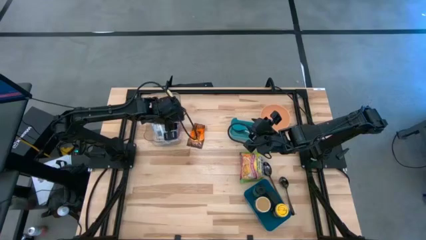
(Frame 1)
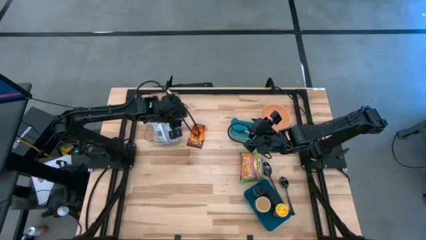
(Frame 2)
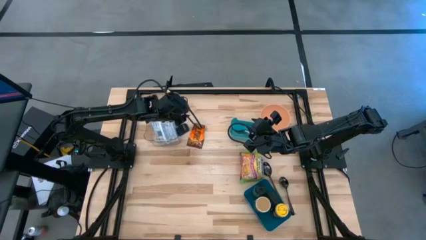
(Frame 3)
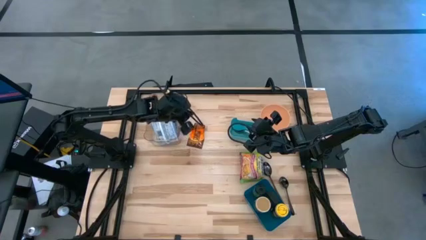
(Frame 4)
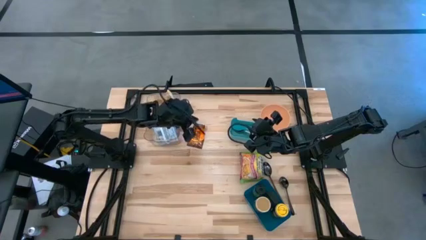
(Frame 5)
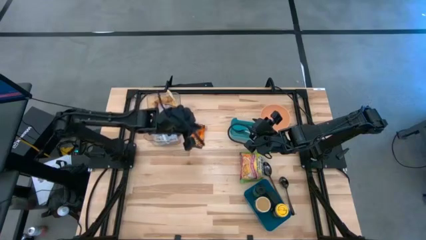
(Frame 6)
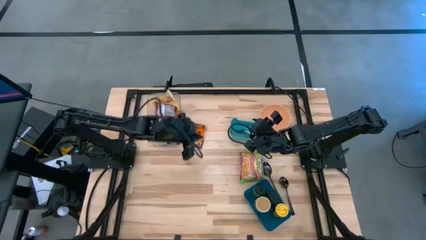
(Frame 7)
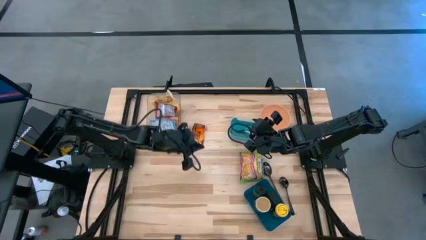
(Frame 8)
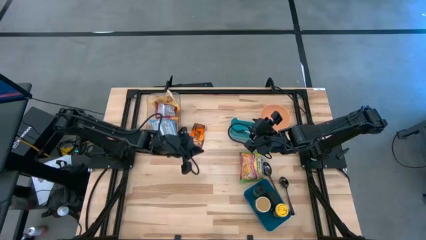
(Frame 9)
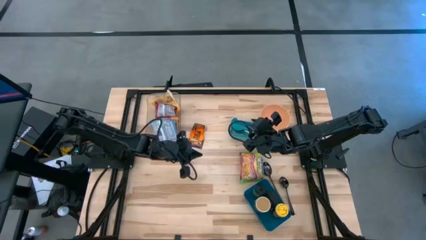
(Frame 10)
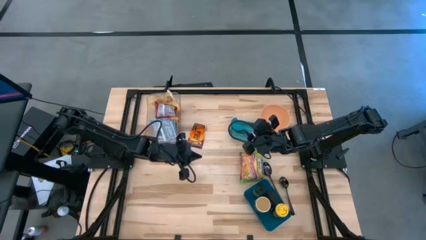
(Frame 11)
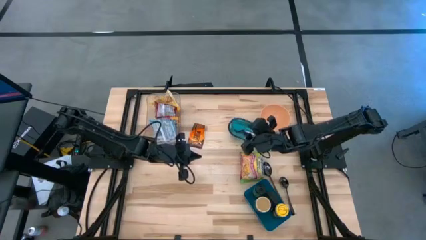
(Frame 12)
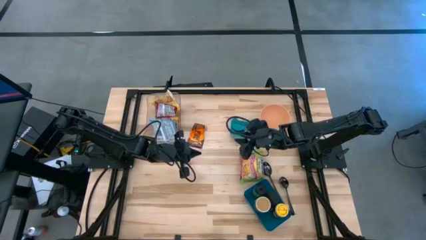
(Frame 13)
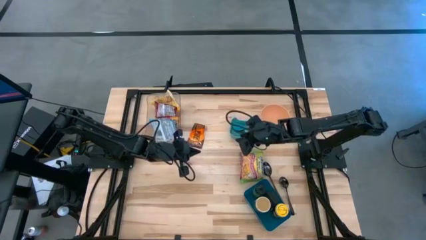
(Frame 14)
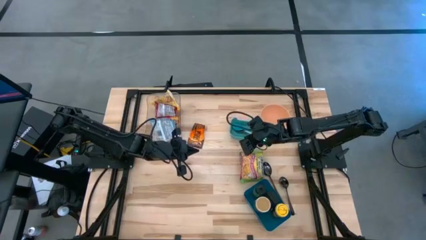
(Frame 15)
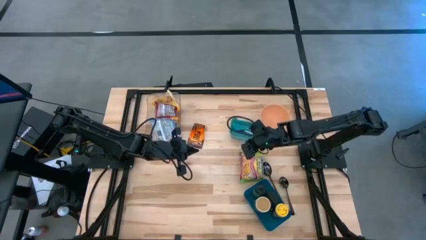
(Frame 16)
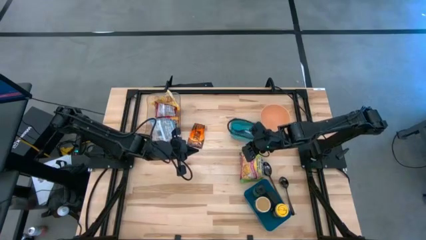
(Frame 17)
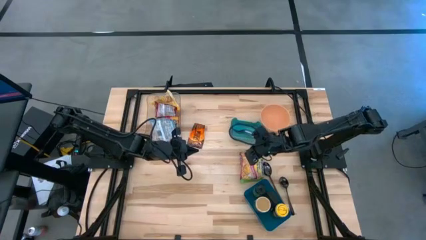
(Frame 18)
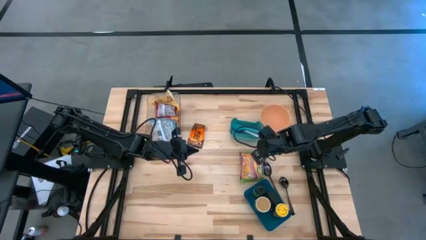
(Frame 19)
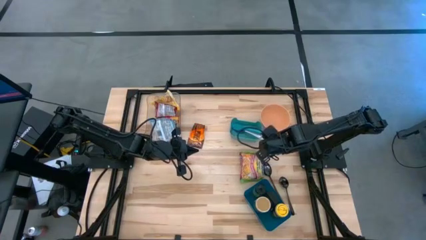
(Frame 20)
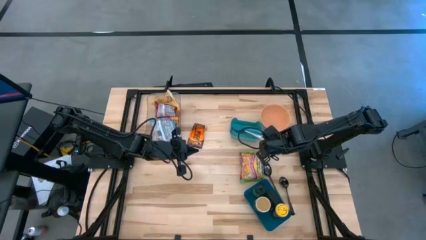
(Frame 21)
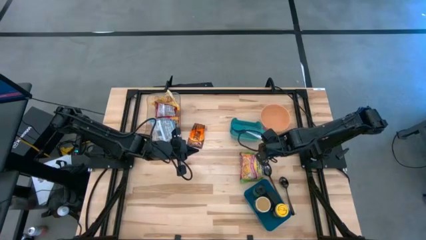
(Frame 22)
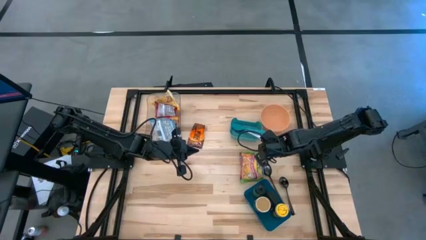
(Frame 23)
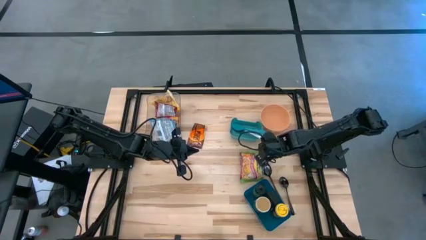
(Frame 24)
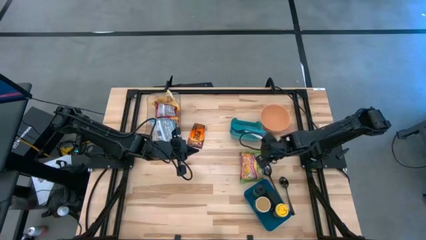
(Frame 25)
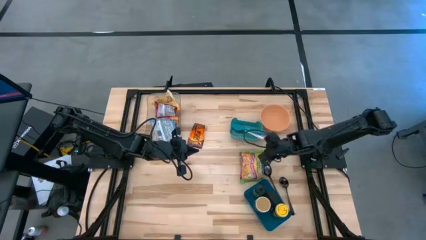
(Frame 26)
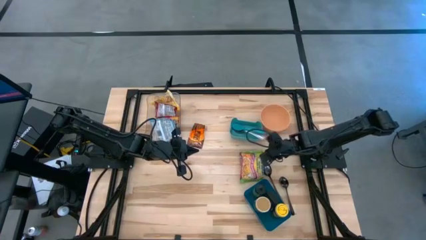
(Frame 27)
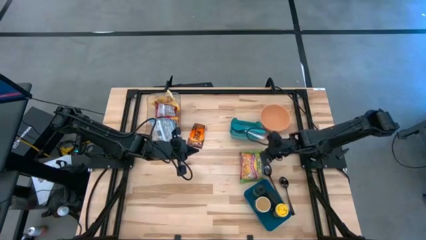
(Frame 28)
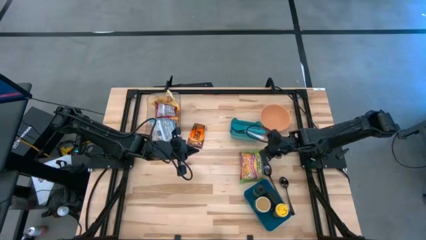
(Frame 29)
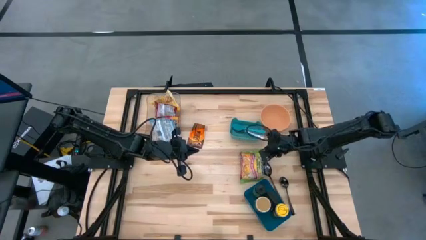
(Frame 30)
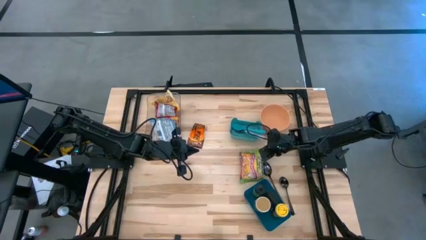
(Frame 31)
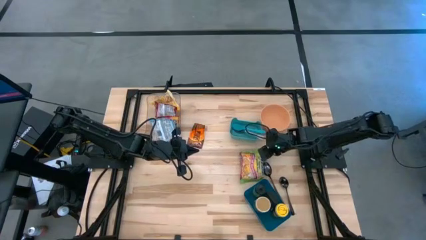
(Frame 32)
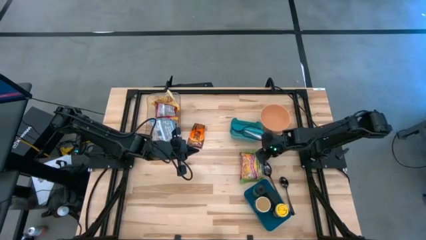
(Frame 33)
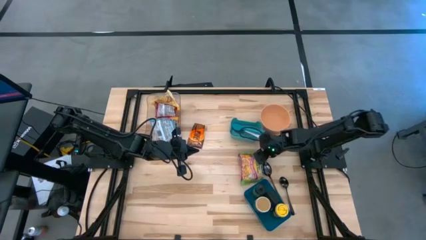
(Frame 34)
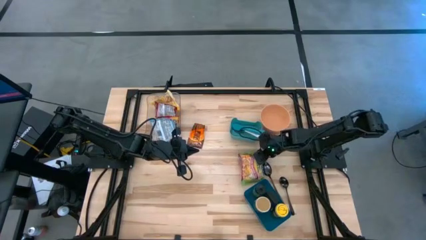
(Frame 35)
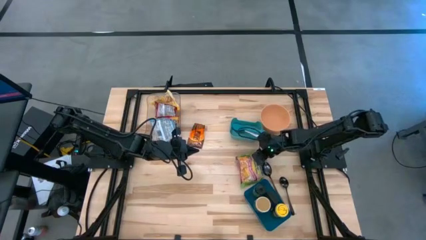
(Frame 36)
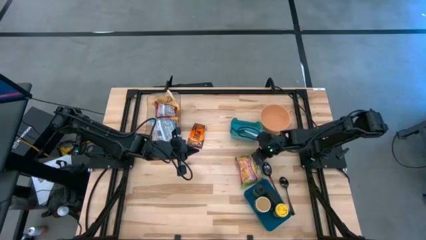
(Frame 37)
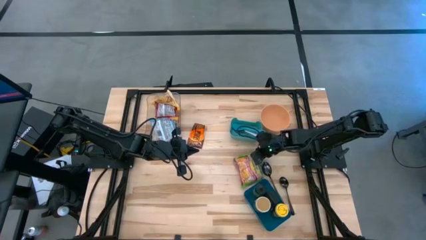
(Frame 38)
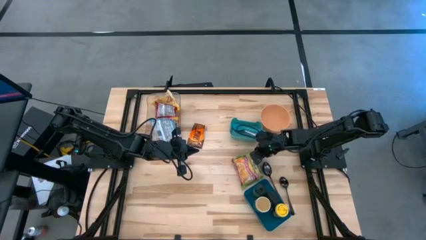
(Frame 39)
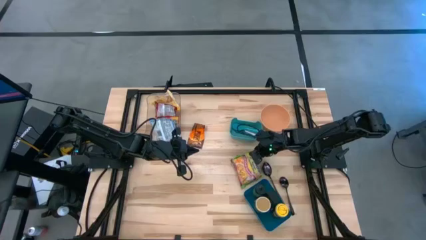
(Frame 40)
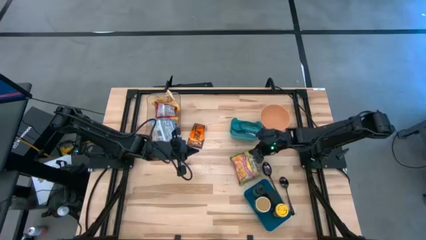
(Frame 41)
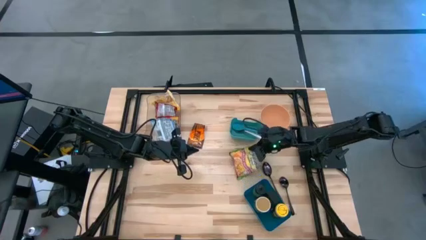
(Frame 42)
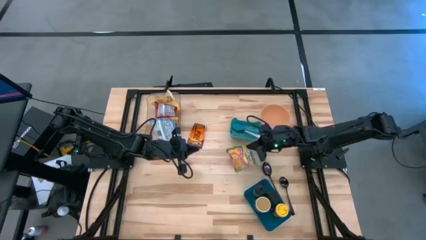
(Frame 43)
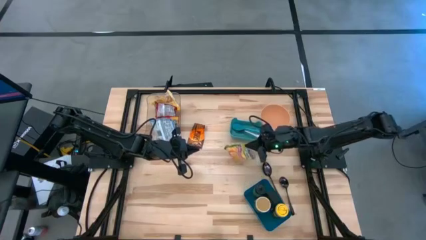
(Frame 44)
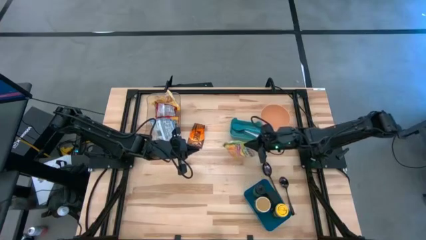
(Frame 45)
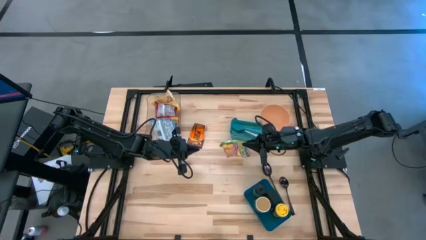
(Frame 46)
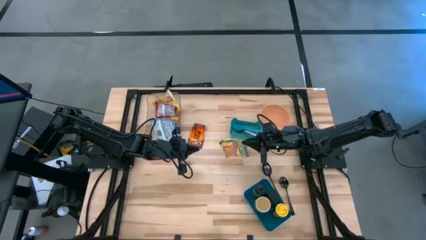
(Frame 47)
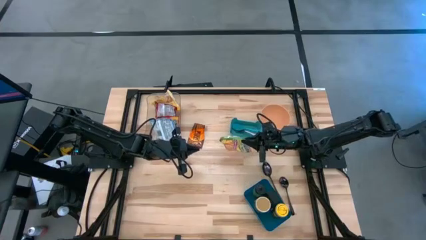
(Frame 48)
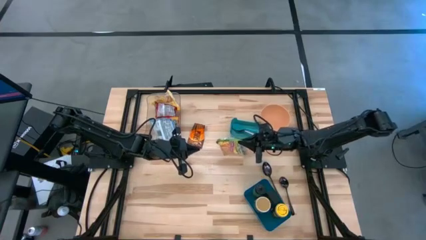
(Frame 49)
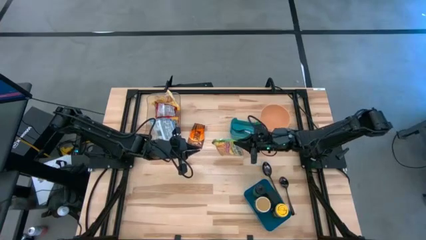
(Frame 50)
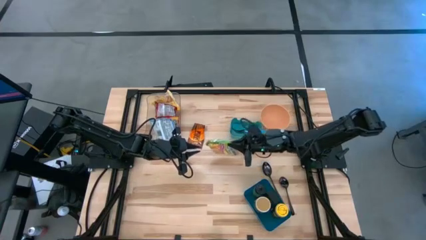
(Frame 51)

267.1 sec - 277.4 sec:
Task: Pick & Place Food Item
Put the green noodle pack into the transparent bin

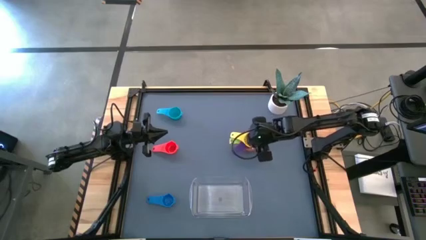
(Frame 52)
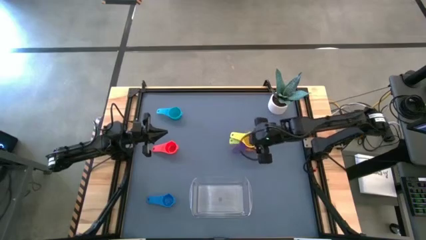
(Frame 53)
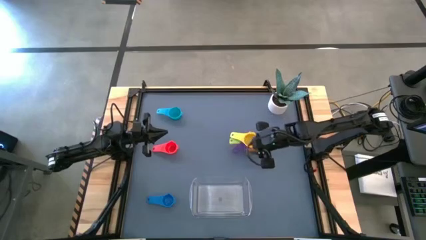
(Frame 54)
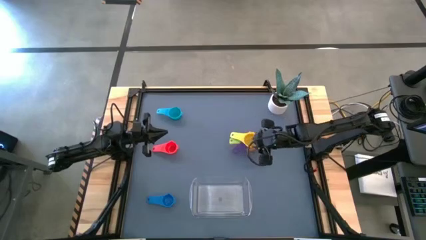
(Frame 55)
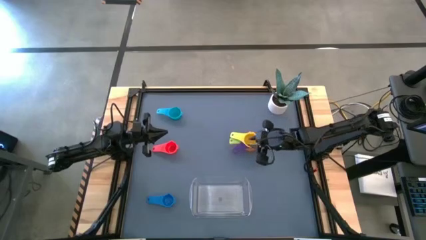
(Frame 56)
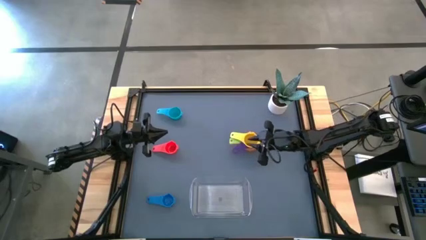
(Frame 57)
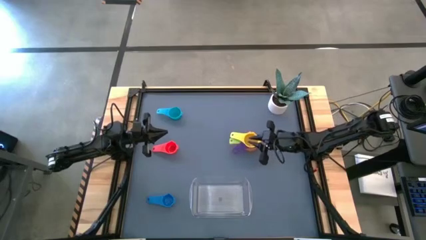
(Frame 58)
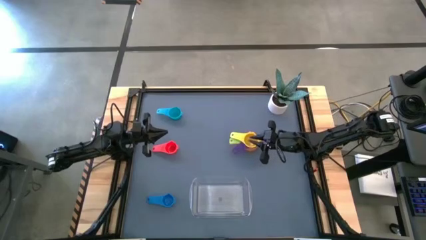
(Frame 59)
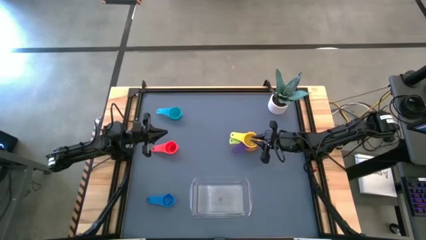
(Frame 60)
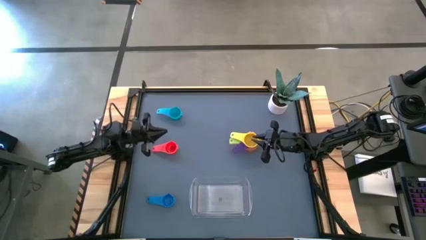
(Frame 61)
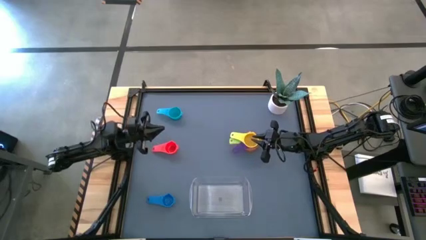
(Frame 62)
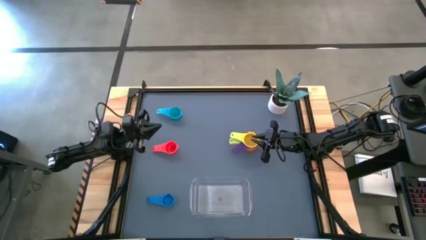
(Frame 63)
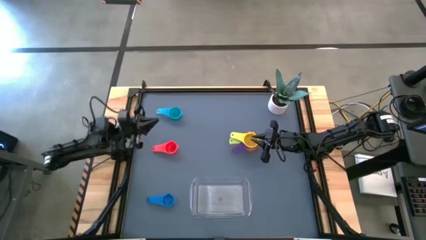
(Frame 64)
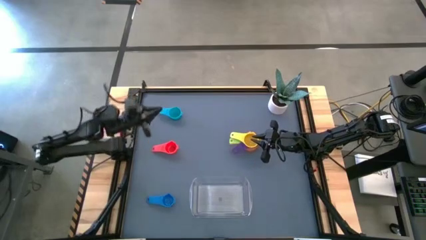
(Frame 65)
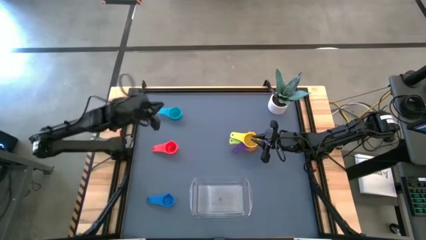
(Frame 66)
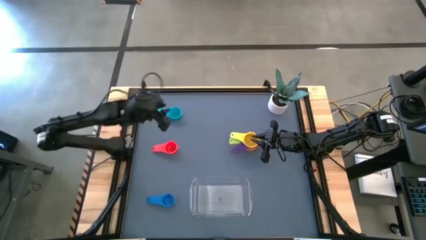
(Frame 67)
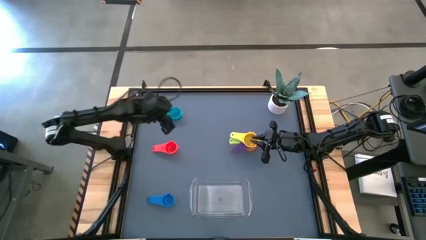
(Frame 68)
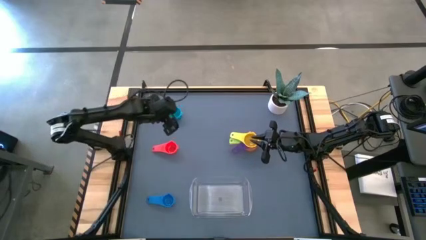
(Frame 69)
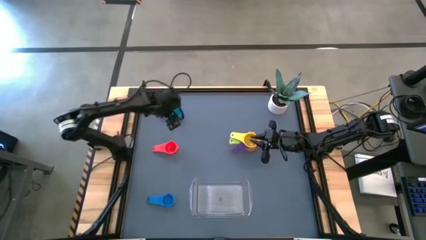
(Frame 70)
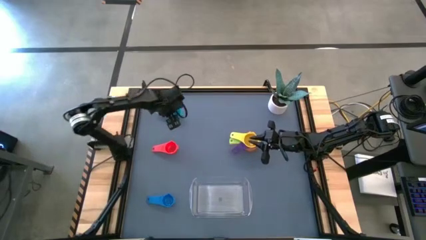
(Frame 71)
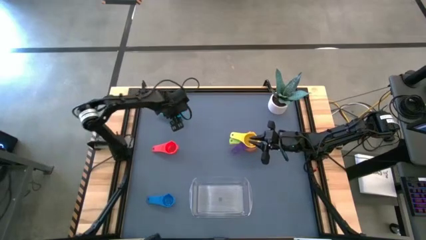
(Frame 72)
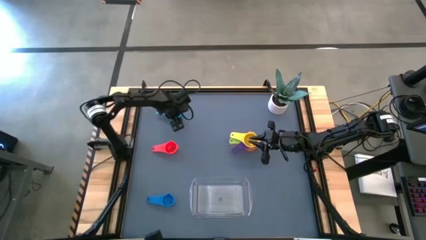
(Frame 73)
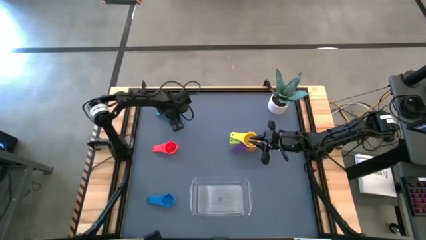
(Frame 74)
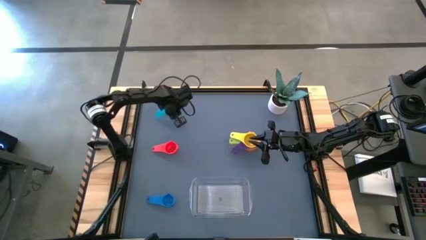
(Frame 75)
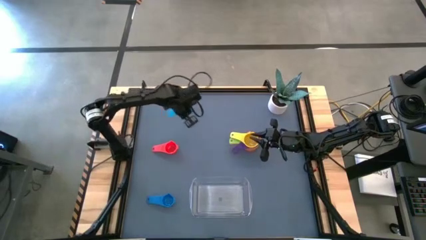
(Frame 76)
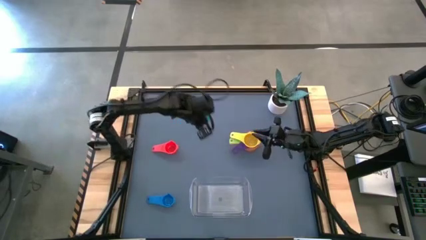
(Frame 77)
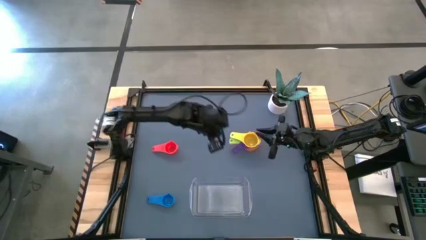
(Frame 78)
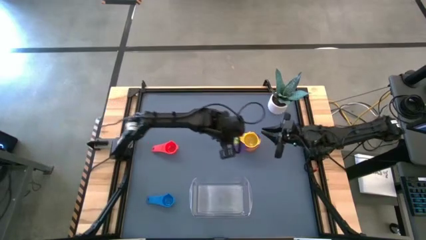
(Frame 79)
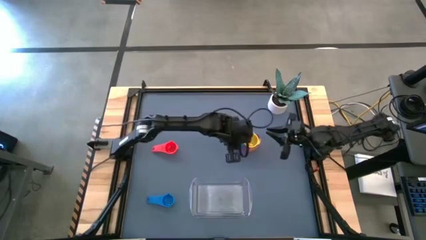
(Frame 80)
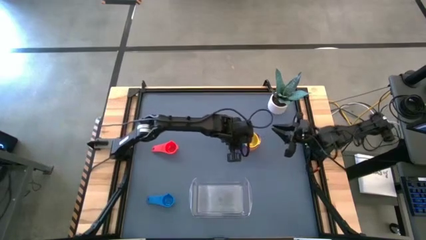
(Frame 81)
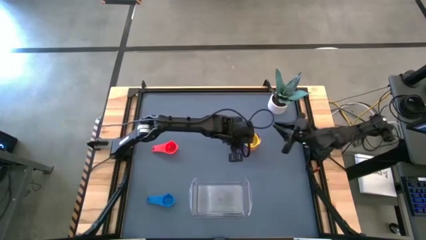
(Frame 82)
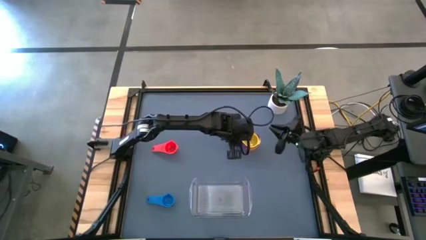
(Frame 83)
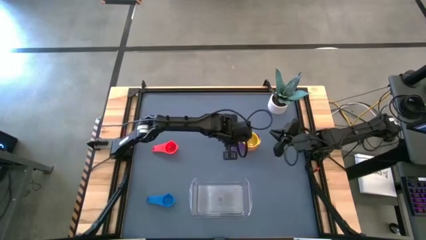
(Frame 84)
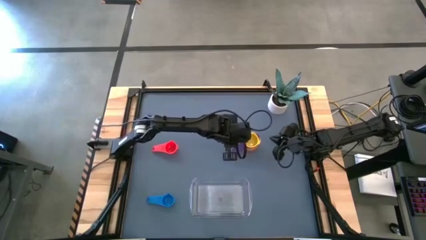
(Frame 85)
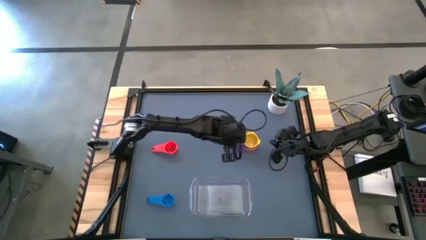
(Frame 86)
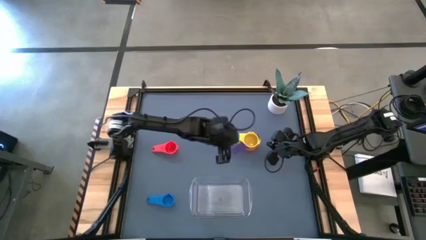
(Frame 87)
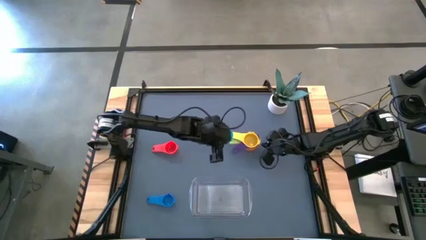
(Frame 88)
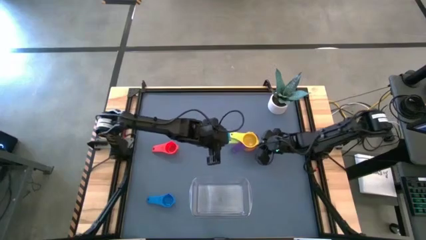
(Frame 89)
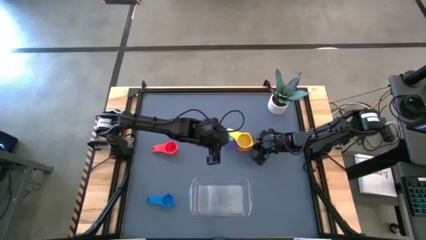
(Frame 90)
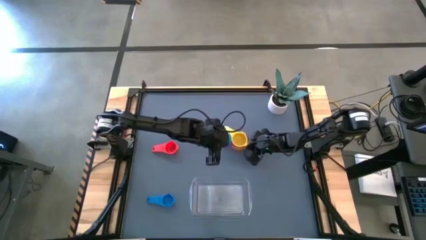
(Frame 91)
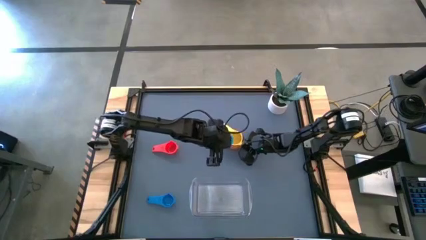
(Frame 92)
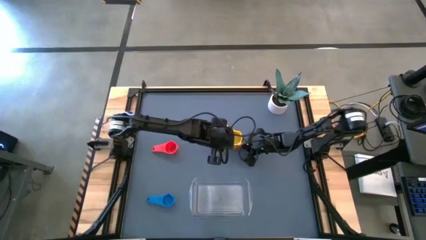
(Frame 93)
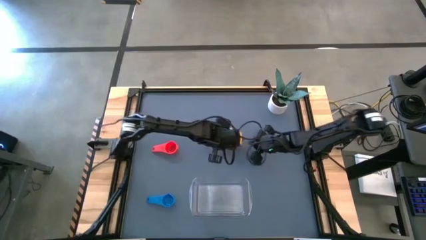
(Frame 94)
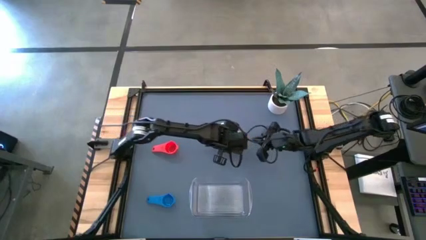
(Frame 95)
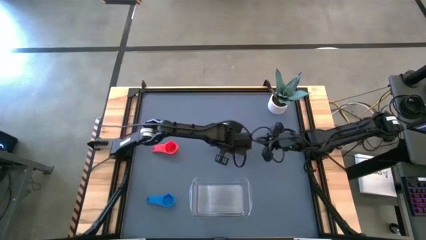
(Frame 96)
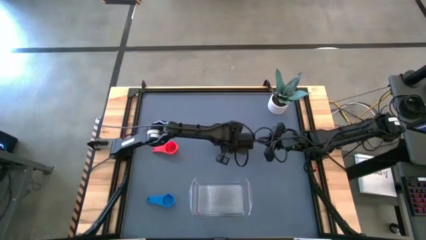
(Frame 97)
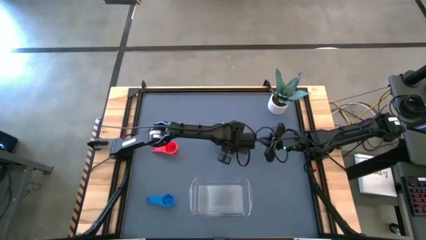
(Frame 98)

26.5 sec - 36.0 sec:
Task: Nest measuring cups in basket
Stack the light blue measuring cup on top of the yellow measuring cup
